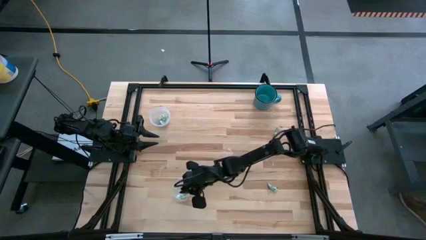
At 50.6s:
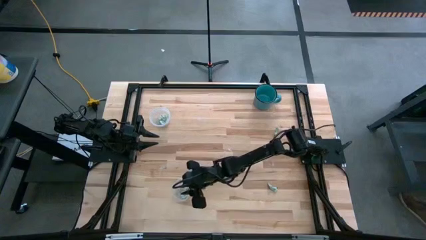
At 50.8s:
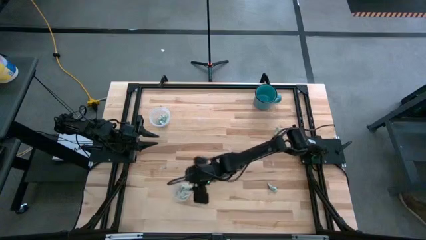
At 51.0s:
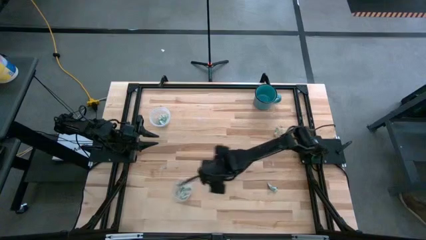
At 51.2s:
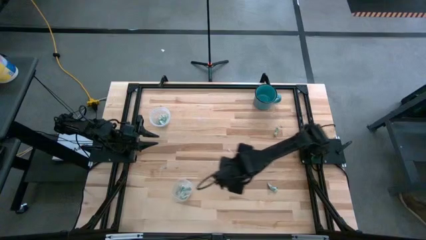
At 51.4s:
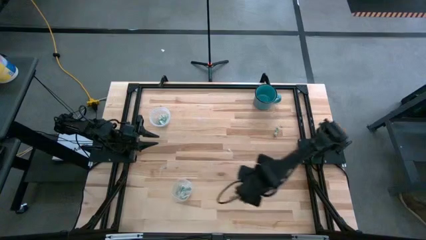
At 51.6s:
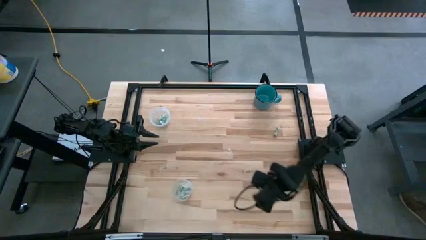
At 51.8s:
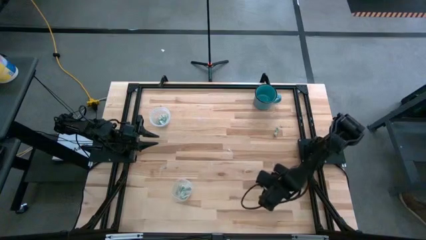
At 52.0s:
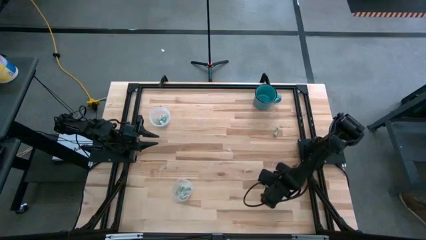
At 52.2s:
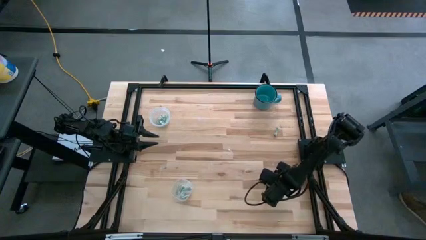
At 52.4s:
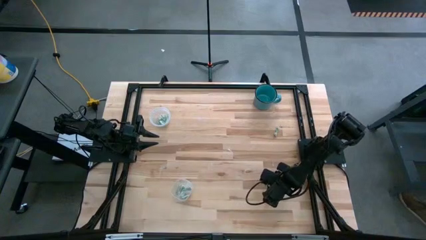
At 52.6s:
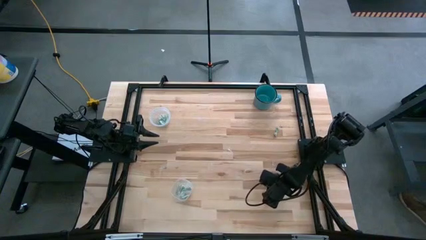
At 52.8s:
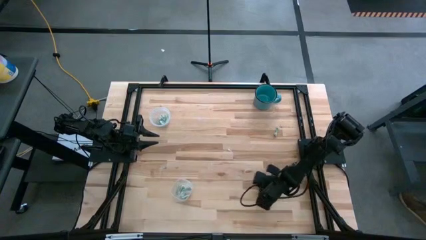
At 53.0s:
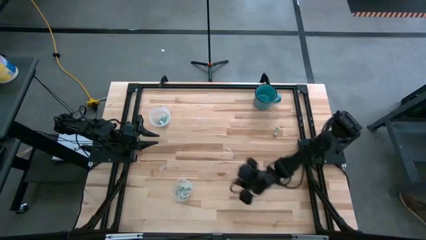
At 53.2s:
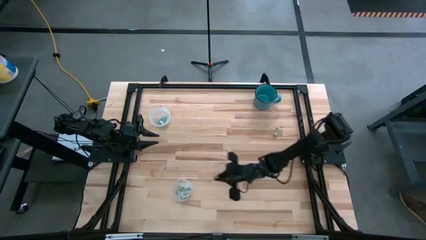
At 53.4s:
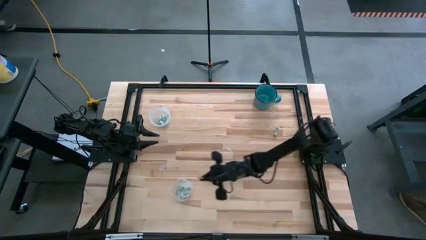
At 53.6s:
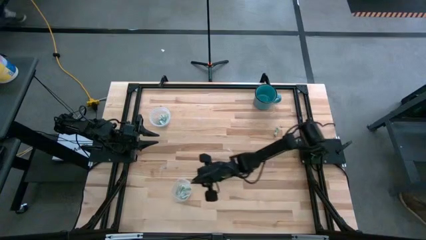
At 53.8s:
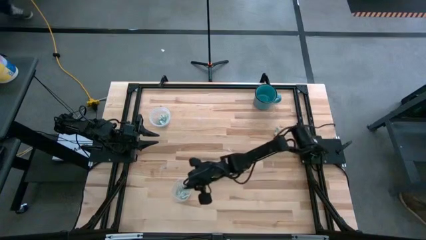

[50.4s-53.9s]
Task: Pick and place Stevia / Truvia into bins
Put the stevia packet into the bottom transparent container

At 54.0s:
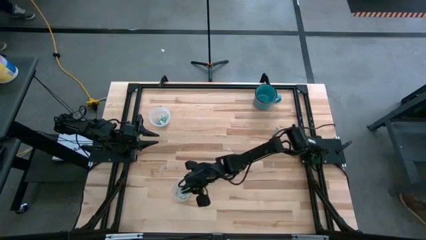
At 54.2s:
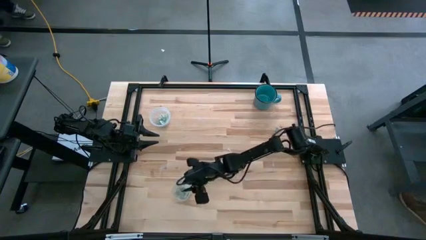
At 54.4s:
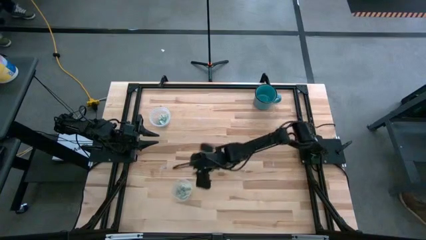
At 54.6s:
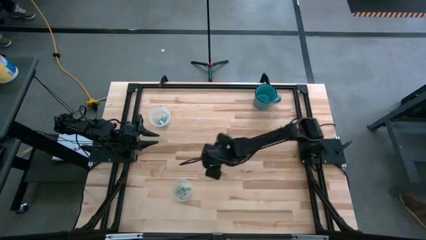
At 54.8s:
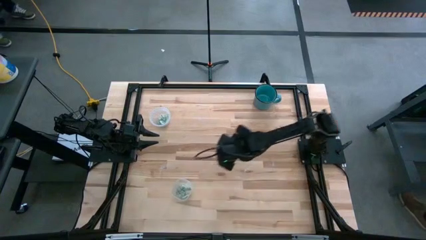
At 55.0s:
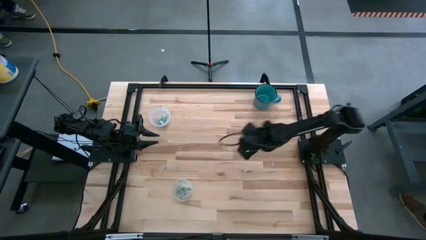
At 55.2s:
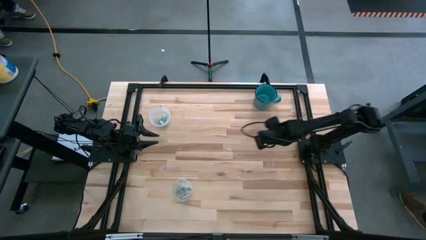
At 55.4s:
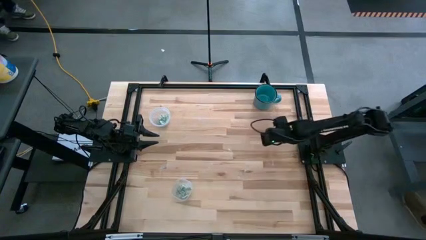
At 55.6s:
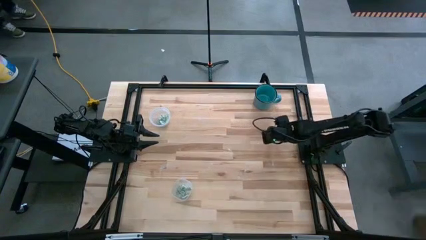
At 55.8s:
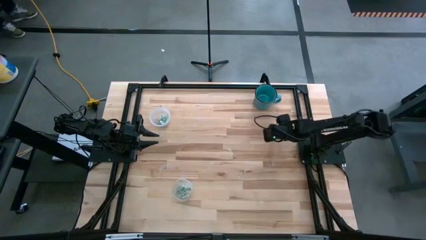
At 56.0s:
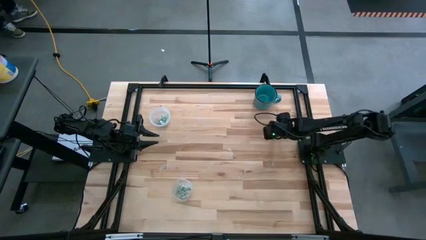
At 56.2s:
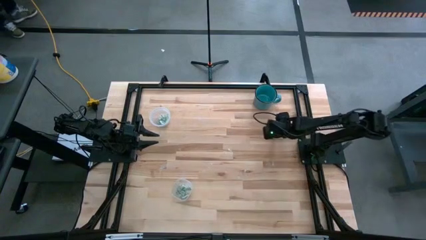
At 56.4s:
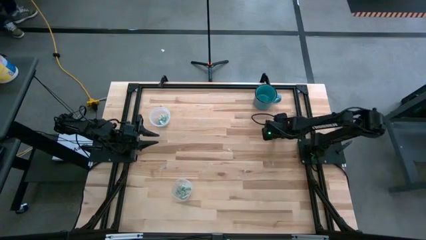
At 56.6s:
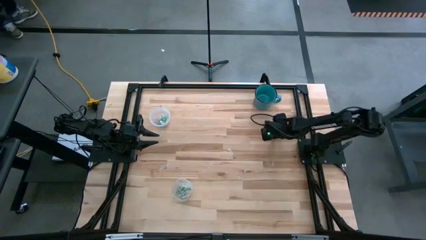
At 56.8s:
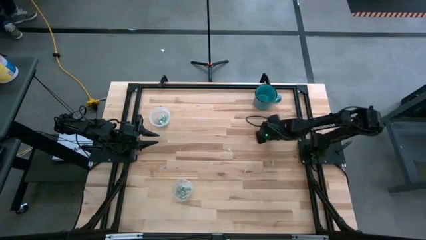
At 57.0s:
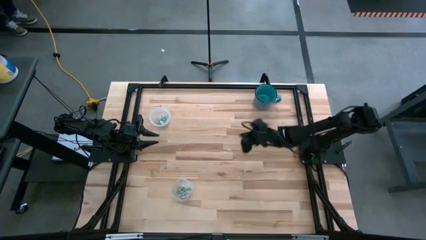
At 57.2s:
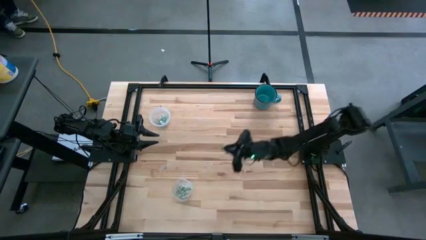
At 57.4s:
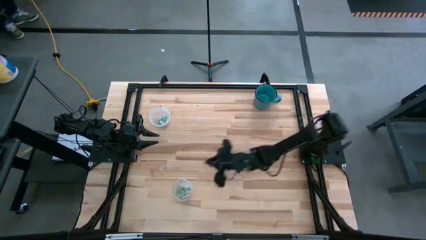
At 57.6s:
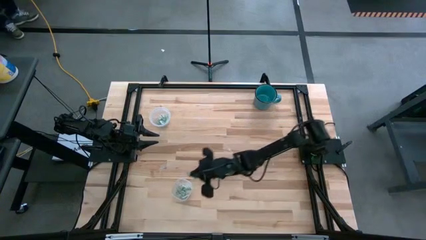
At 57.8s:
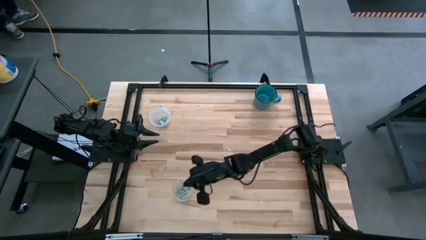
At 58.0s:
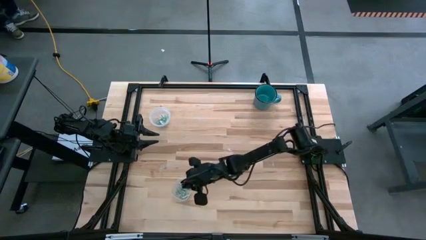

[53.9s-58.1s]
Put the stevia packet into the bottom transparent container

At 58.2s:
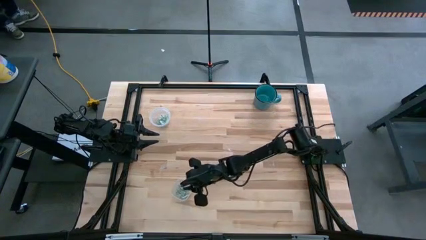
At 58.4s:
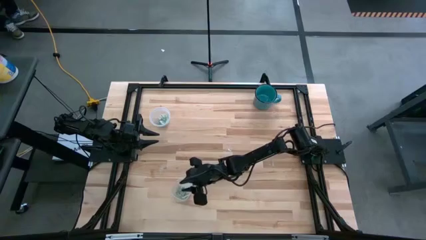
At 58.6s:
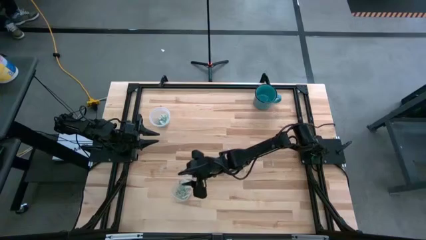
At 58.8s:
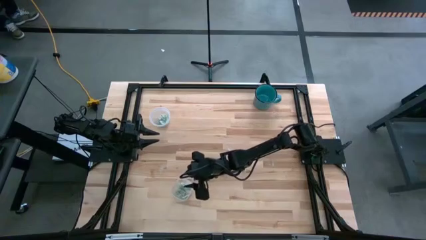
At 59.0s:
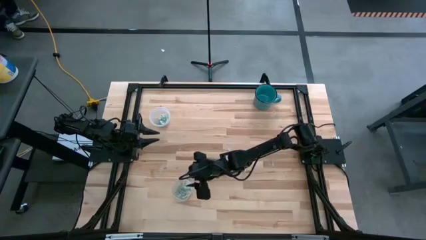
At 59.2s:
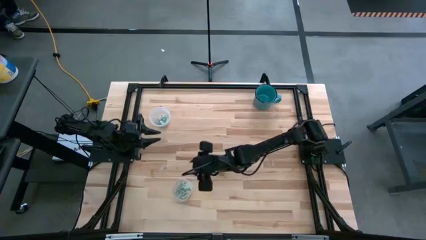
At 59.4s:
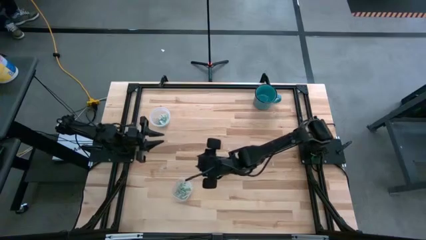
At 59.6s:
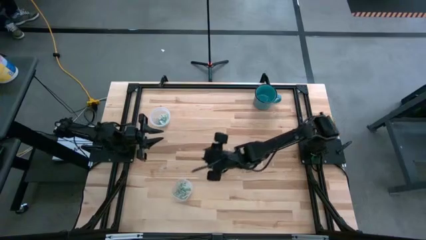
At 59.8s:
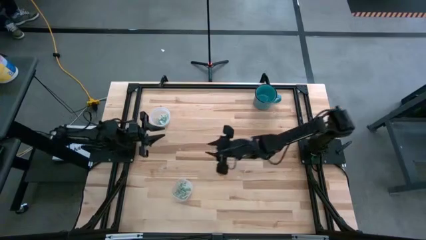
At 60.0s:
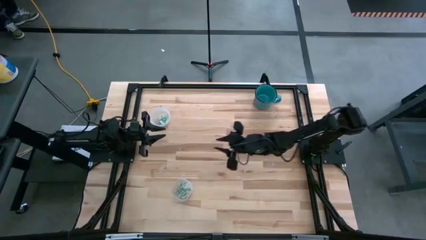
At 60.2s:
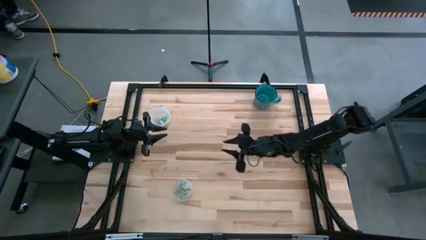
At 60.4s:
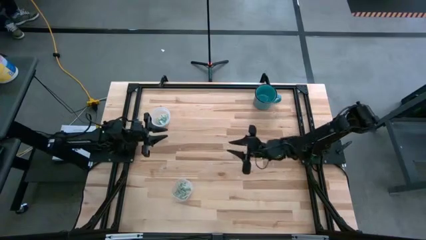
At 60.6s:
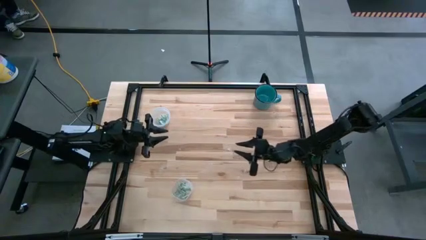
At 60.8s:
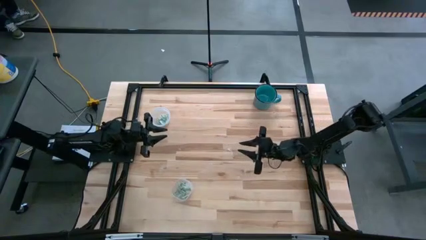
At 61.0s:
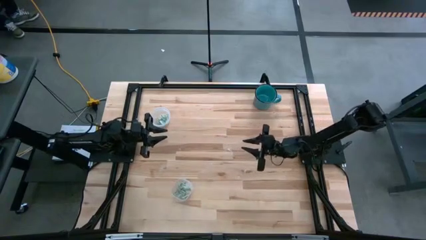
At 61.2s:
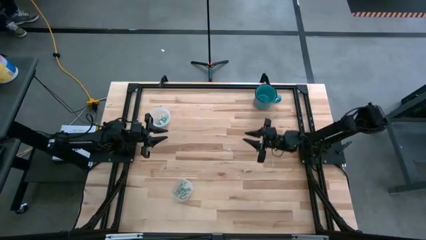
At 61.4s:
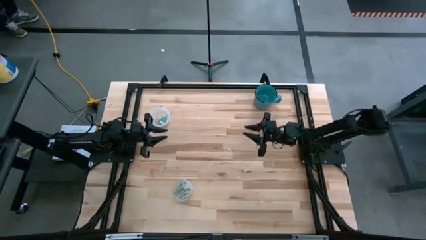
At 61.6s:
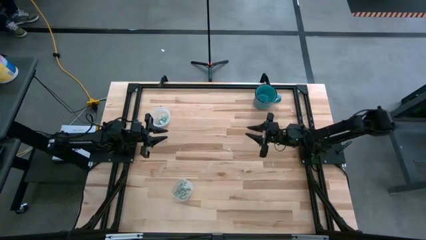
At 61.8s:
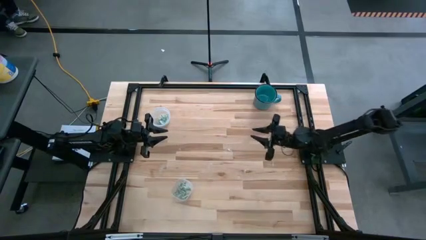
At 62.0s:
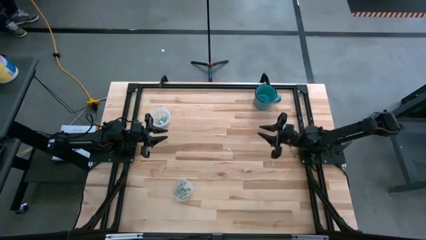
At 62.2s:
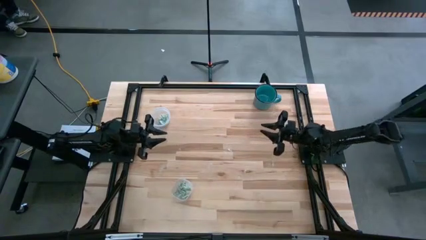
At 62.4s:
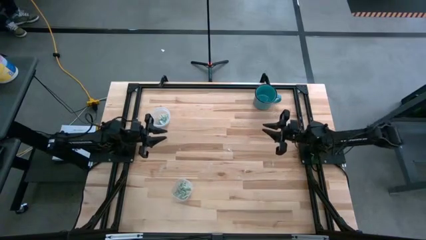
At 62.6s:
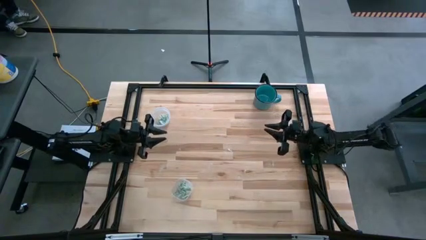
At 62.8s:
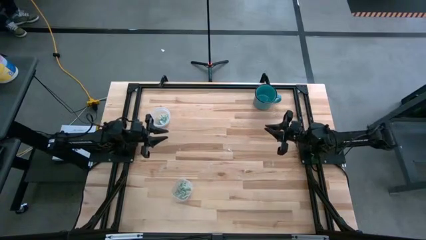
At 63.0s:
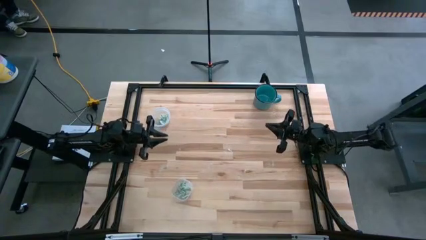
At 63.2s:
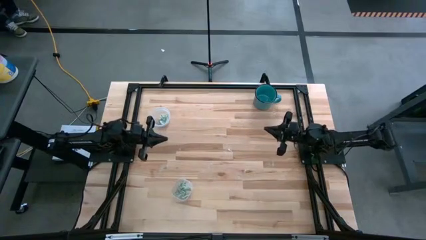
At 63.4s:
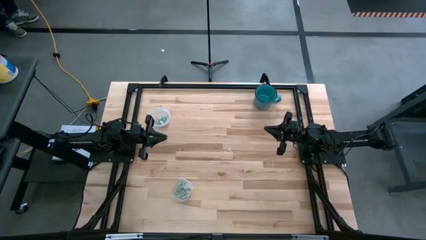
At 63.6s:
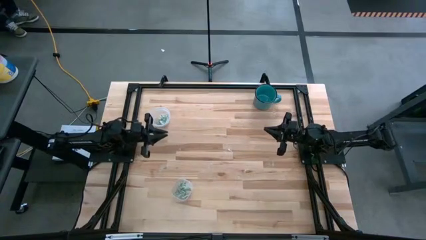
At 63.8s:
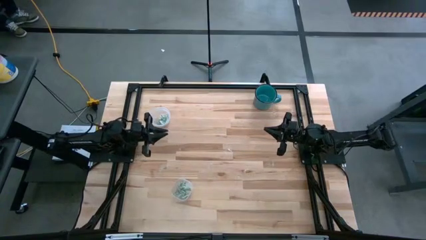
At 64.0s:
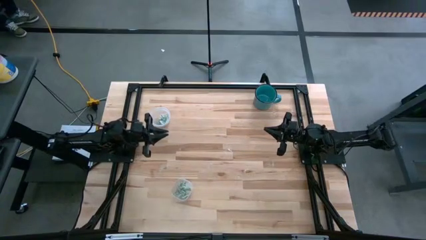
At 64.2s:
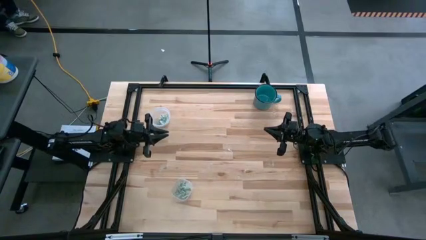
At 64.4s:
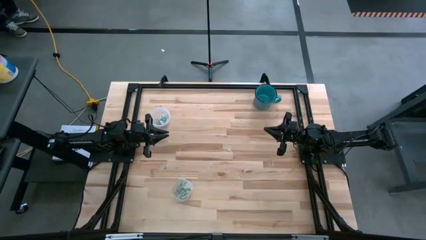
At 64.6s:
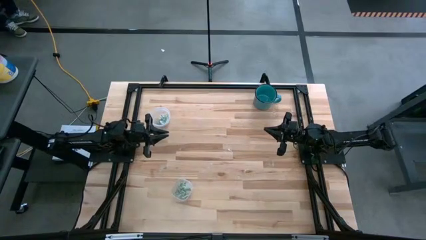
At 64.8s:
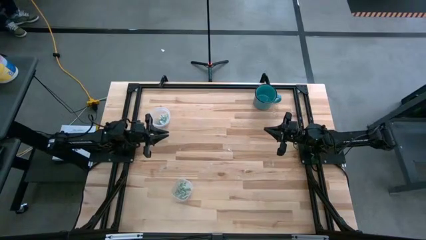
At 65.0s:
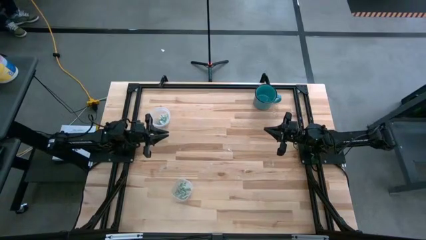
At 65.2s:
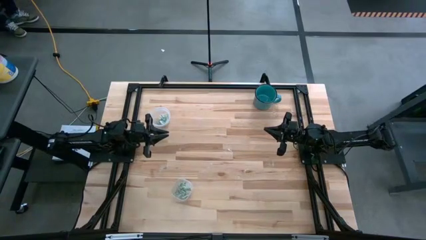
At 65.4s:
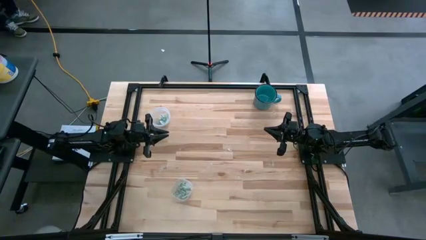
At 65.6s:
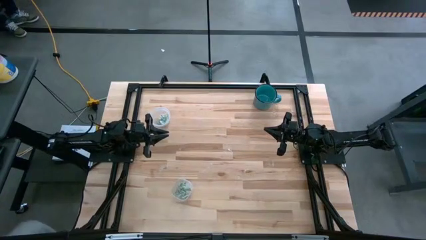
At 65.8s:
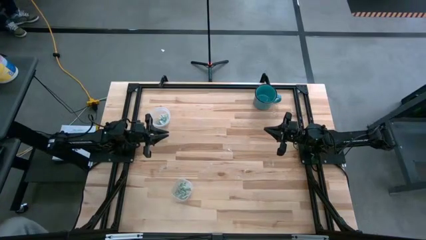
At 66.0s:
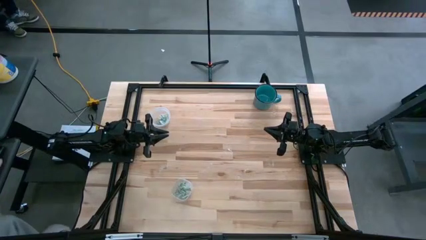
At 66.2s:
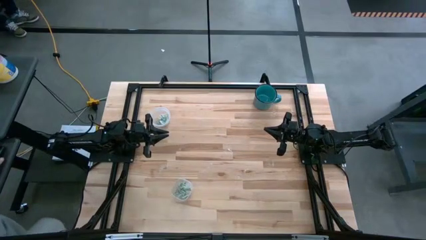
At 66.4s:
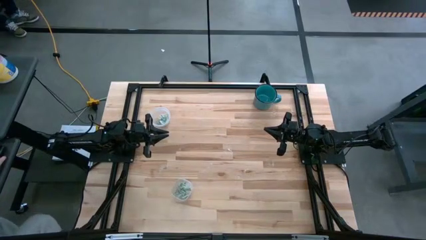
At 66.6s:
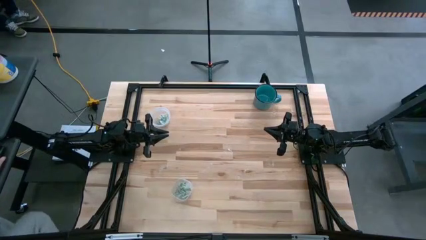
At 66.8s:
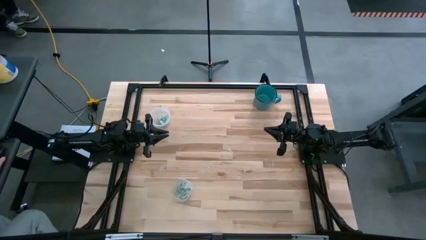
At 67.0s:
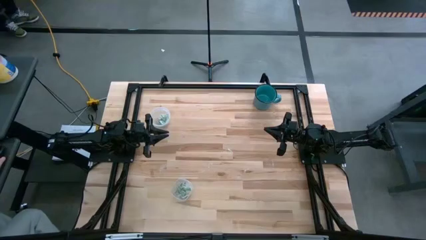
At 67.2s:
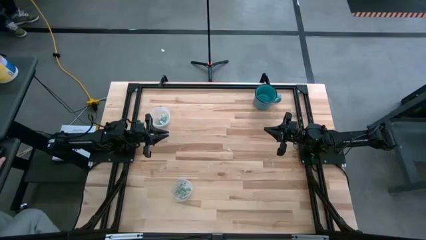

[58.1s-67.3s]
Return to Home Position
